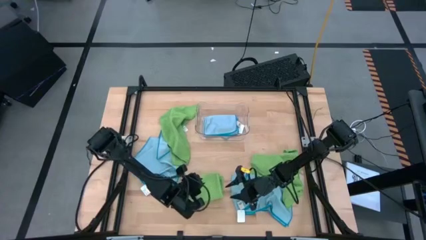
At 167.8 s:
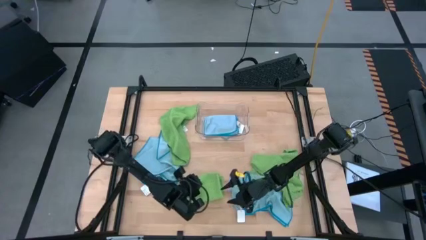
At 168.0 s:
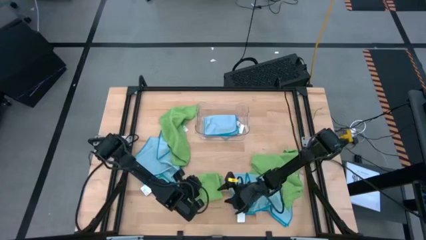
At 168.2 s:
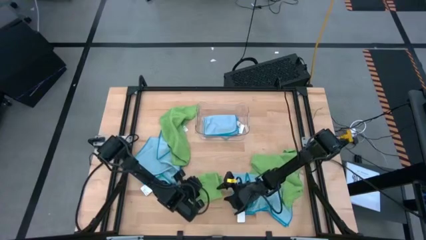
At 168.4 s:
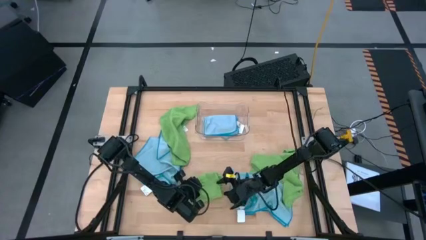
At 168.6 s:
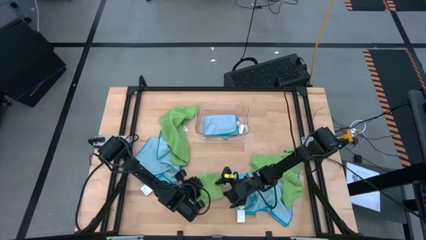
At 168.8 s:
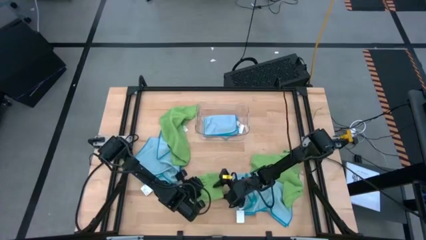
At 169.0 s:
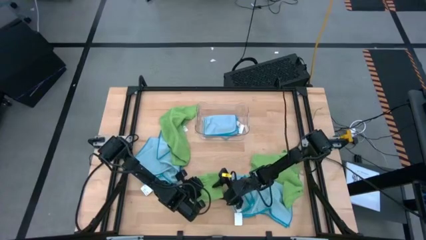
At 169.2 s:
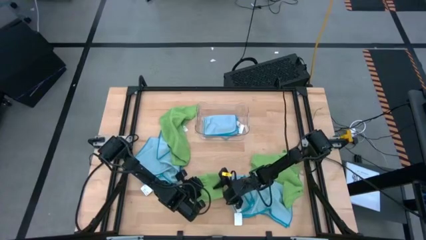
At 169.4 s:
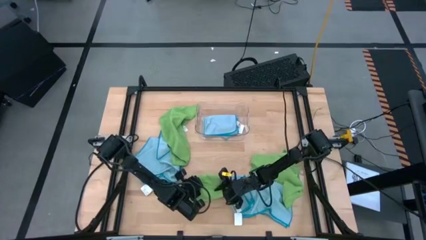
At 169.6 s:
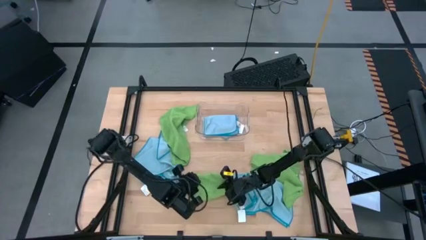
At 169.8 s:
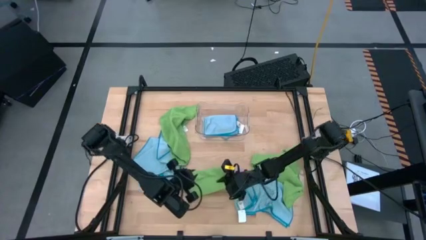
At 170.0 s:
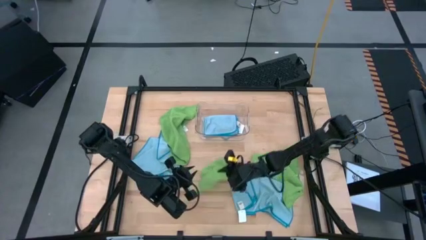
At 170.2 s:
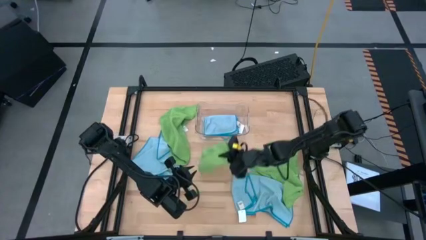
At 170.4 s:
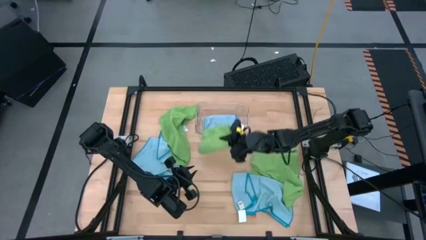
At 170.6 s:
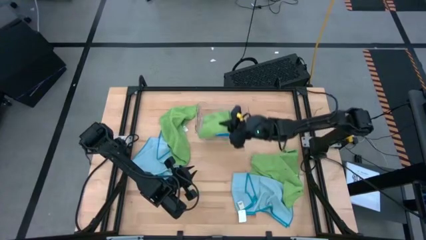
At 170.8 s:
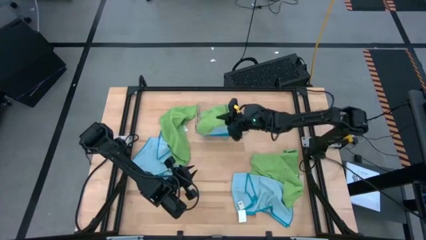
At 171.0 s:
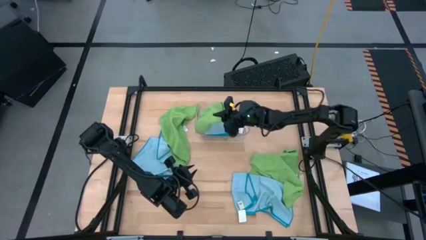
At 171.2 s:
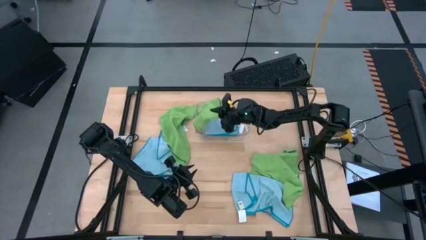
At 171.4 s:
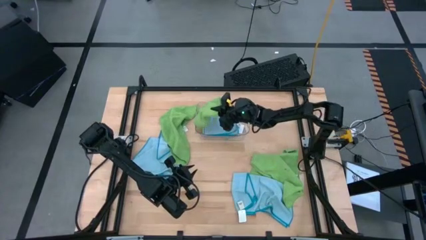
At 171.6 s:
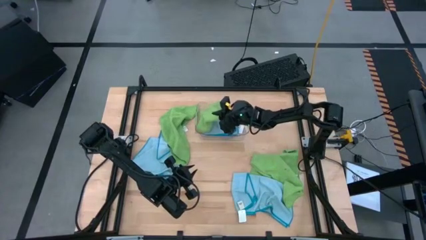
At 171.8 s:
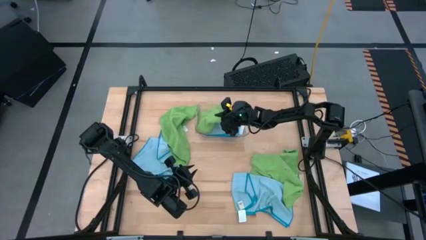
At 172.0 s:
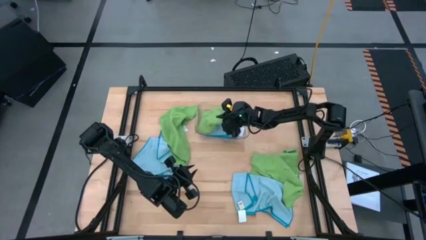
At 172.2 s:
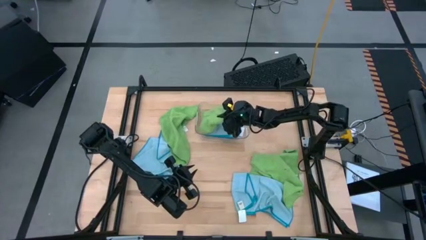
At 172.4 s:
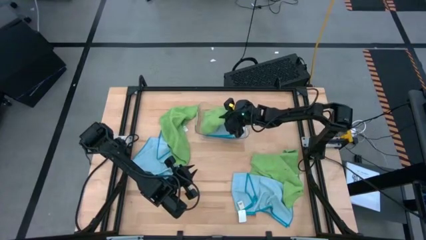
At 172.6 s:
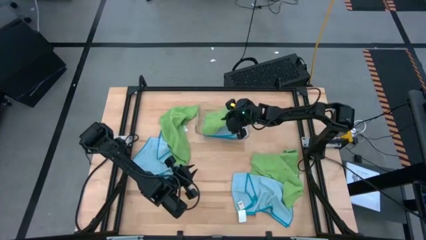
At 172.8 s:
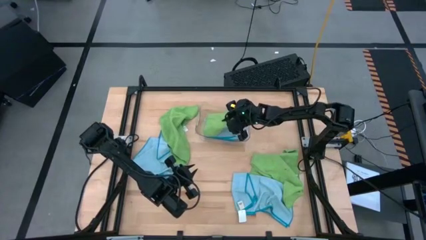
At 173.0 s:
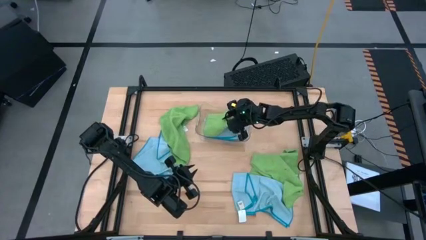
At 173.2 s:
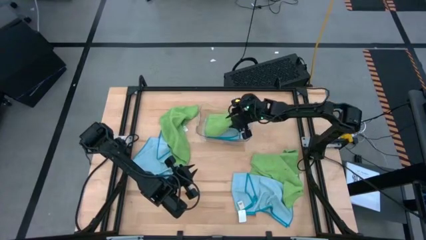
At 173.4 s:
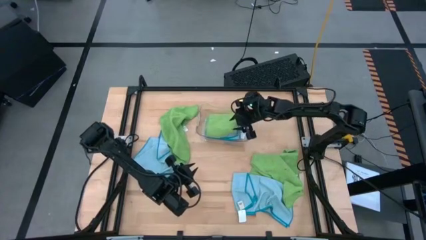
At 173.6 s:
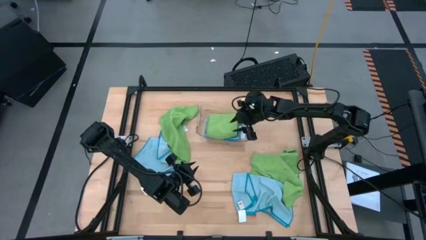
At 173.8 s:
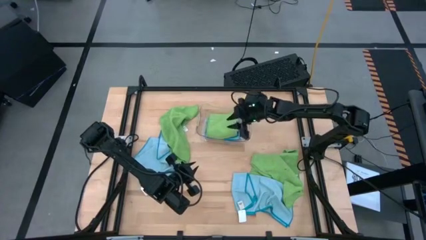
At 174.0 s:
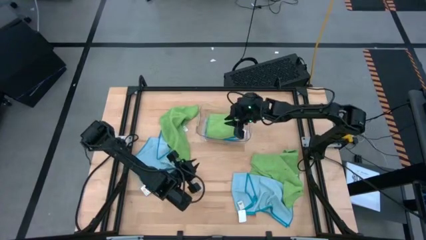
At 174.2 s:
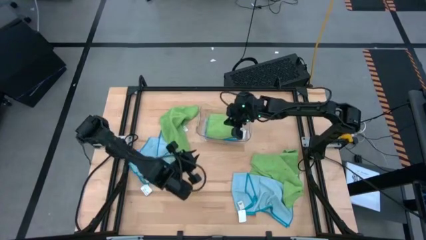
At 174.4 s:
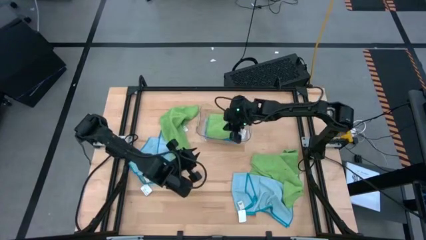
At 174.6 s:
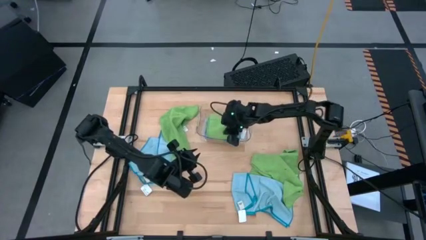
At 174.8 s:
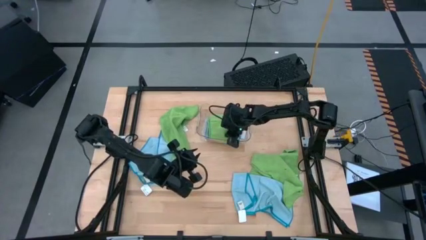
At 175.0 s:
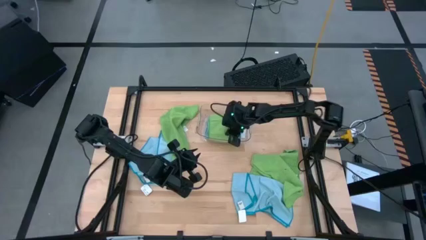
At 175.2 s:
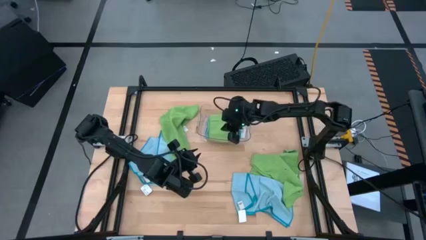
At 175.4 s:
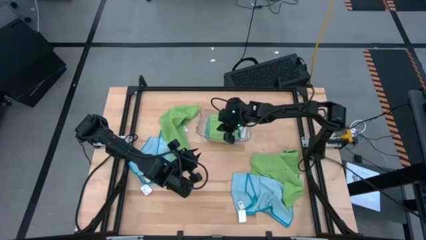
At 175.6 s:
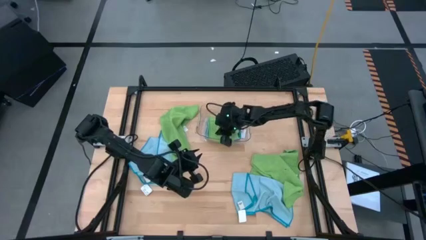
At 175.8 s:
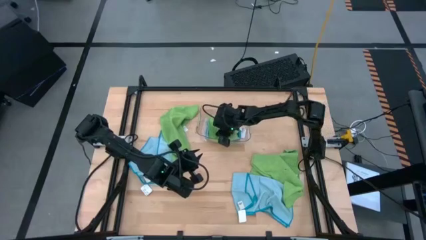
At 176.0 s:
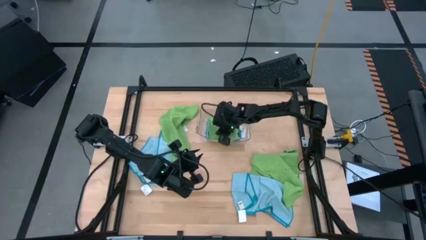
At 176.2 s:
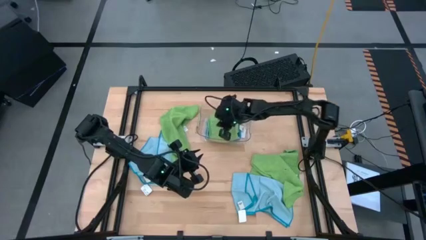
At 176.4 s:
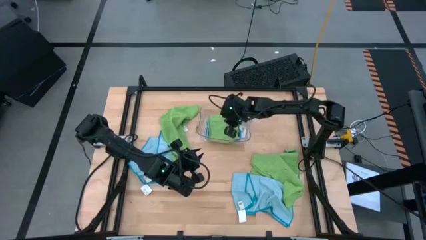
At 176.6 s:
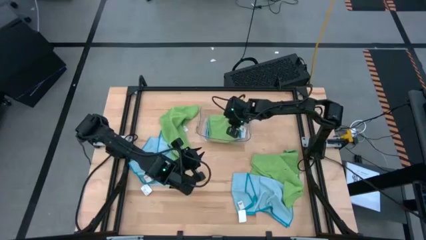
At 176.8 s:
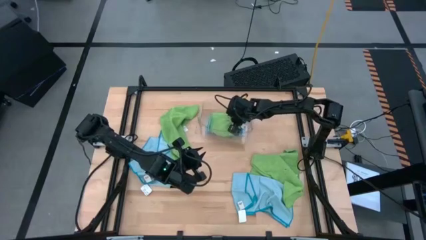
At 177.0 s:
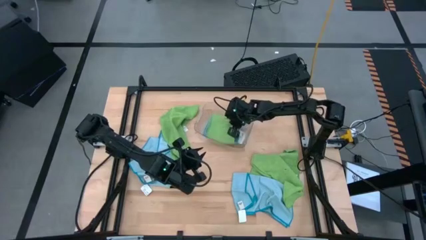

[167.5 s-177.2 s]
Task: Fold microfiber towels
Stack the folded bottom left green microfiber cloth on top of the blue microfiber cloth into the transparent bin

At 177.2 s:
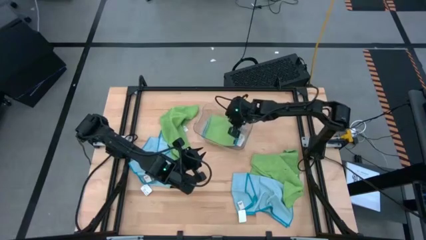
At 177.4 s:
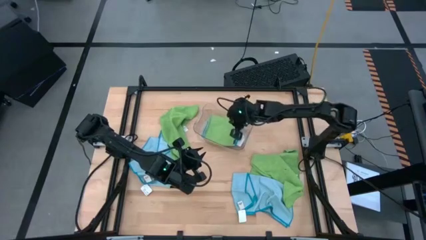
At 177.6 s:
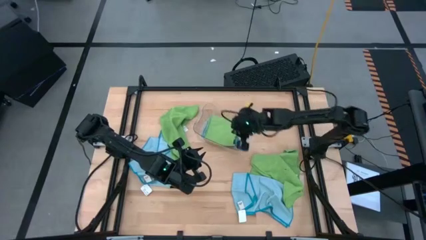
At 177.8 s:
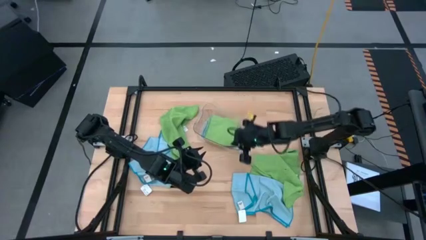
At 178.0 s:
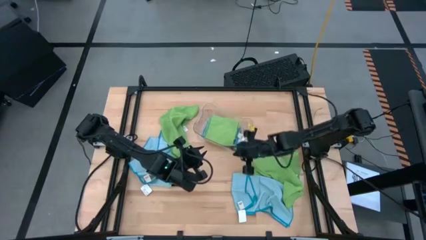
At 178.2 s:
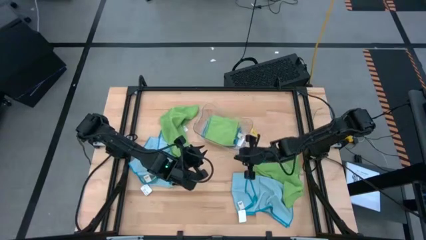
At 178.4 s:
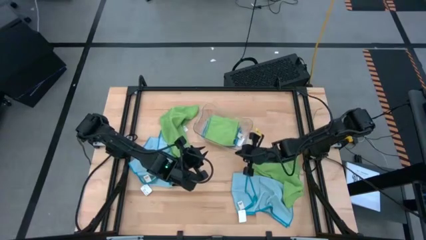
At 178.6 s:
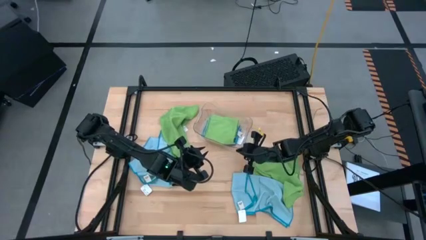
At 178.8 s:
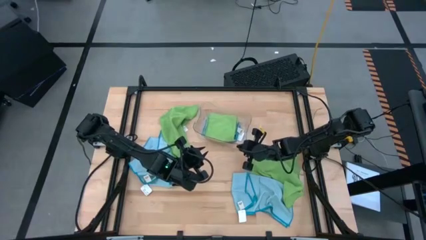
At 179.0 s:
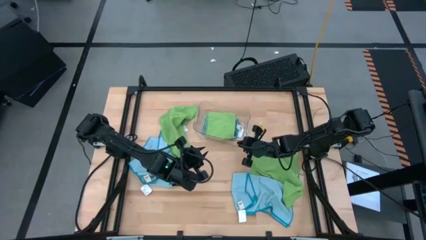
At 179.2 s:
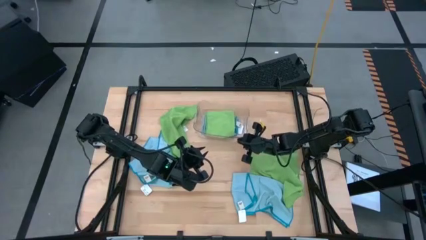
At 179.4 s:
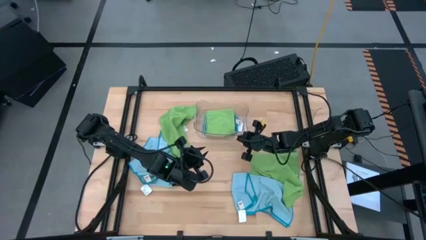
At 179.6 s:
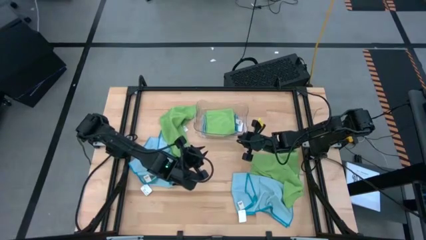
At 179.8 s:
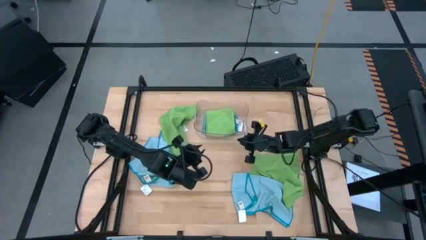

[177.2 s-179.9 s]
Adjust the transparent bin
